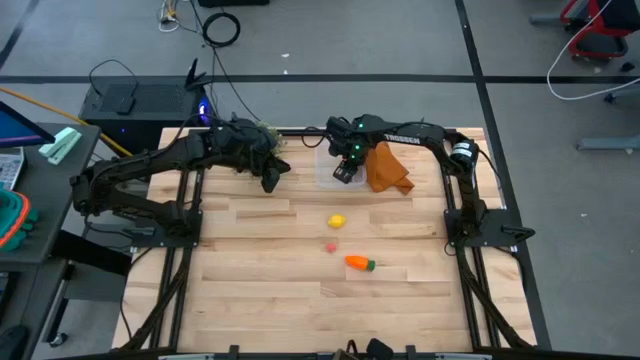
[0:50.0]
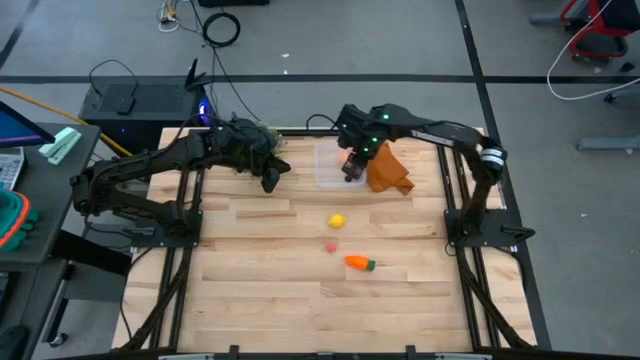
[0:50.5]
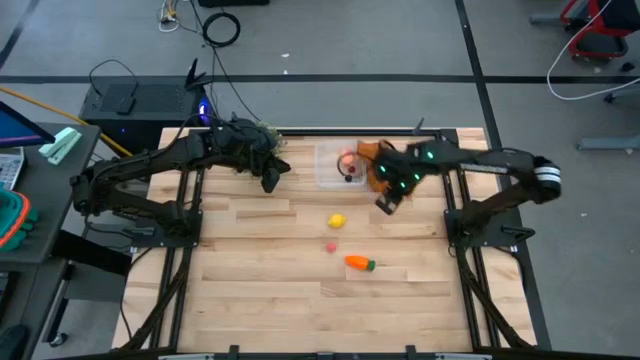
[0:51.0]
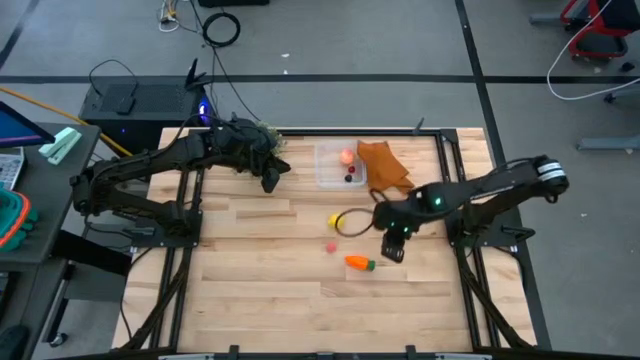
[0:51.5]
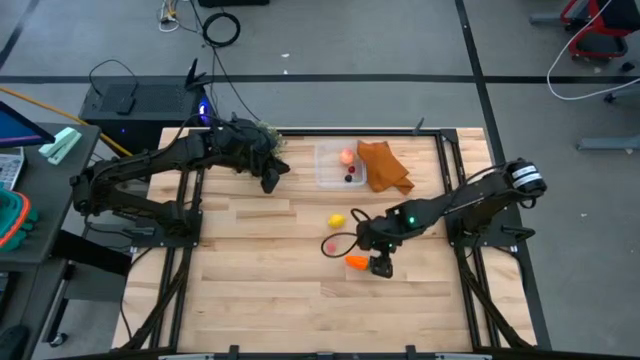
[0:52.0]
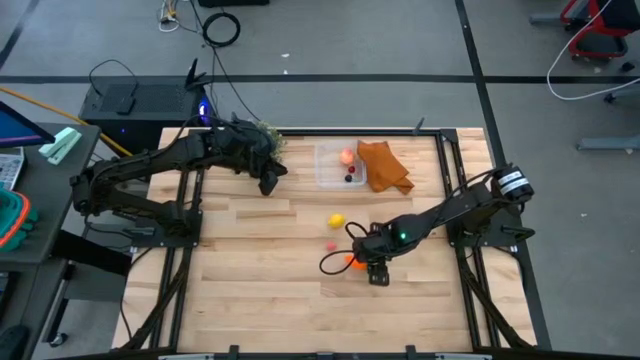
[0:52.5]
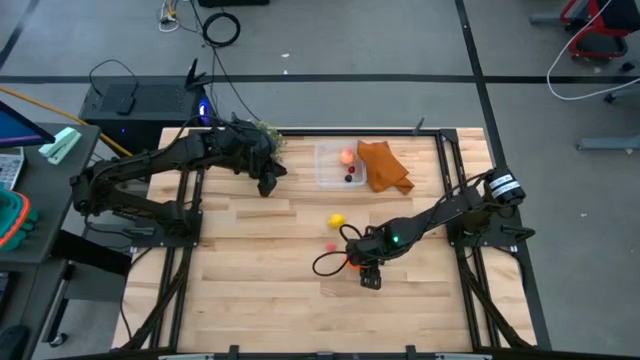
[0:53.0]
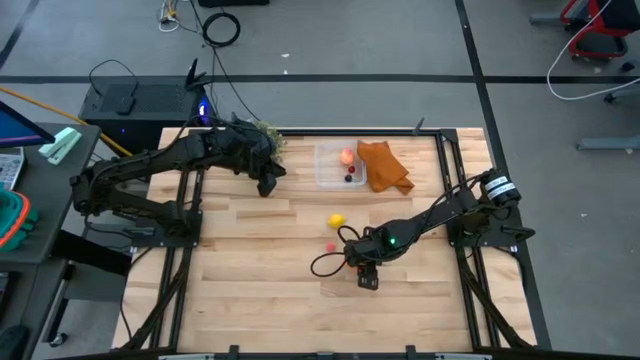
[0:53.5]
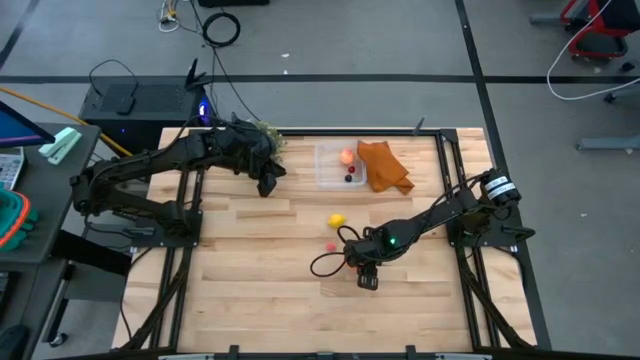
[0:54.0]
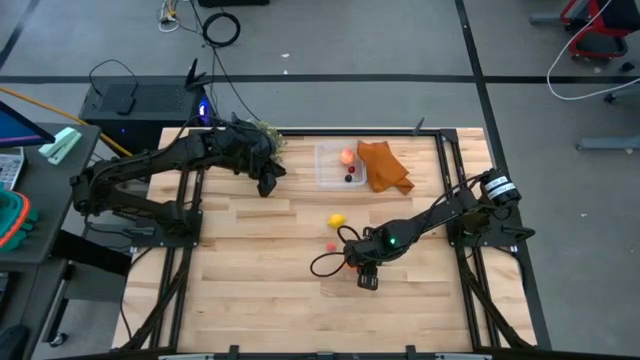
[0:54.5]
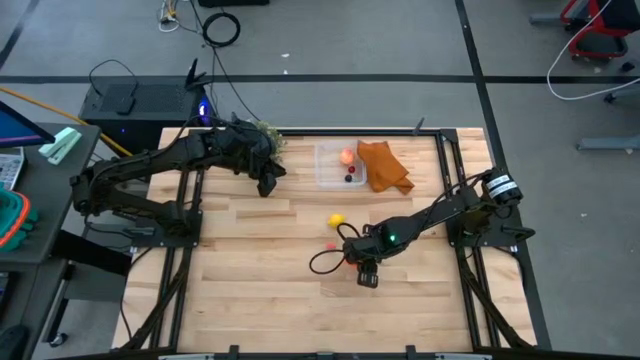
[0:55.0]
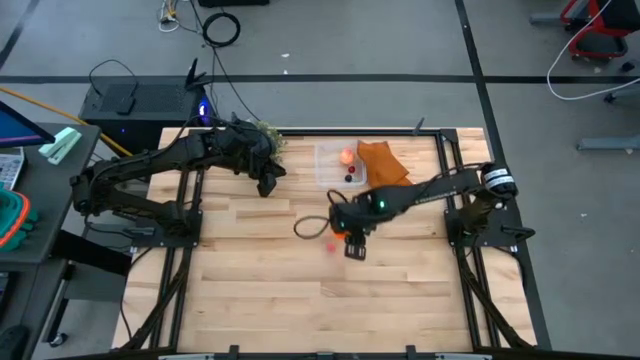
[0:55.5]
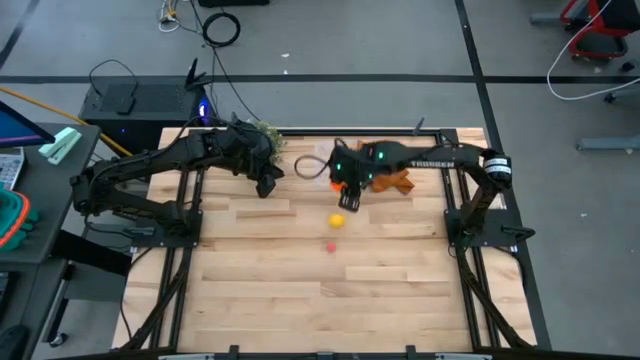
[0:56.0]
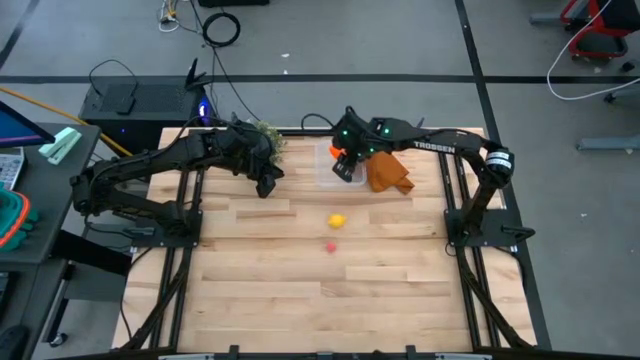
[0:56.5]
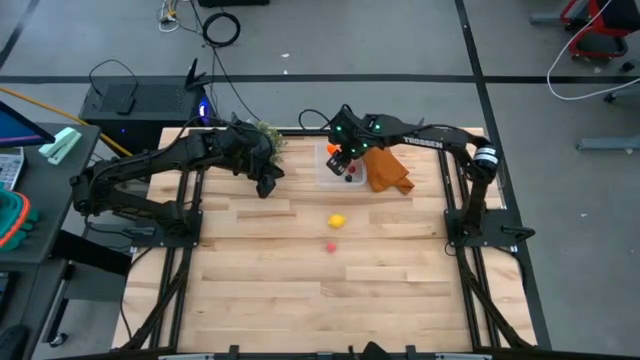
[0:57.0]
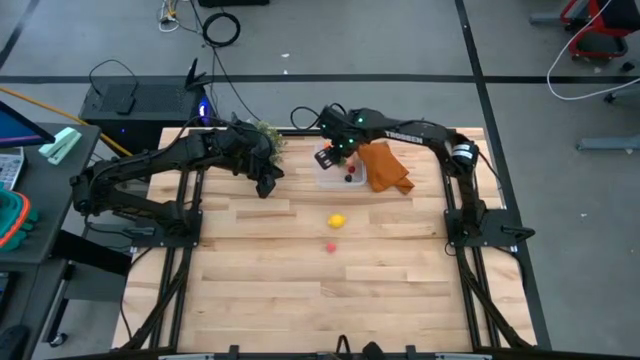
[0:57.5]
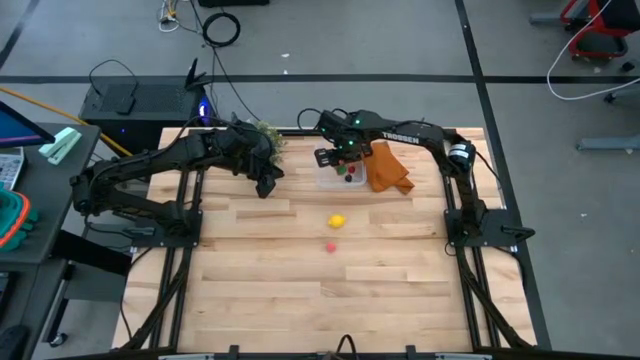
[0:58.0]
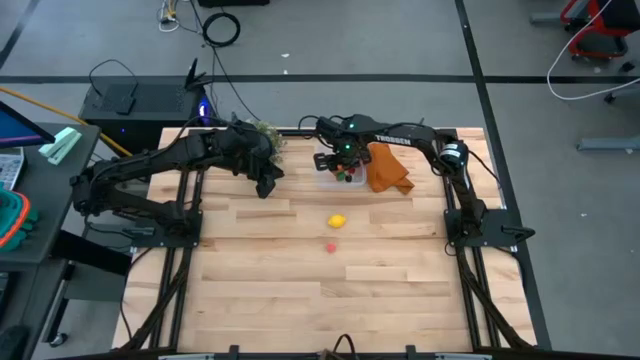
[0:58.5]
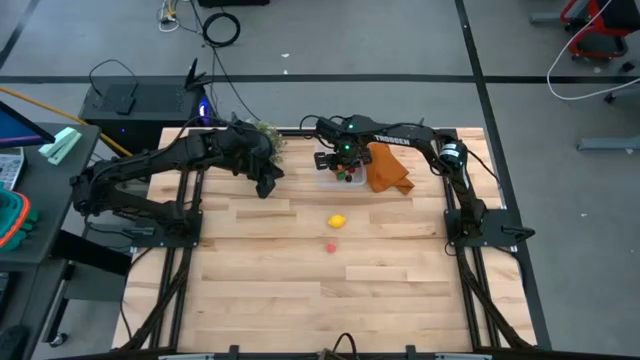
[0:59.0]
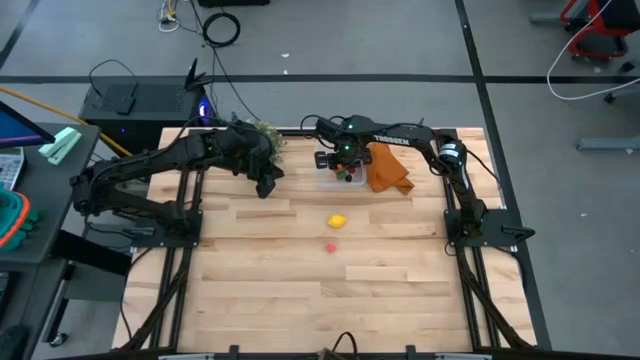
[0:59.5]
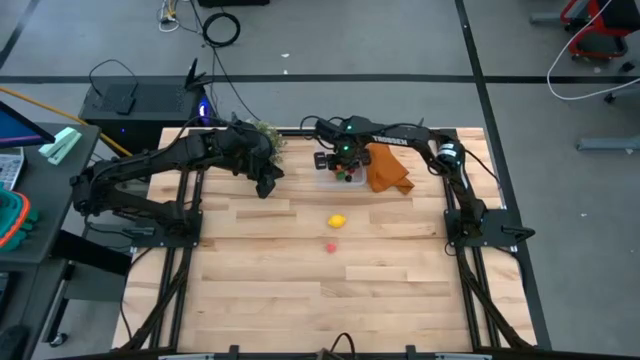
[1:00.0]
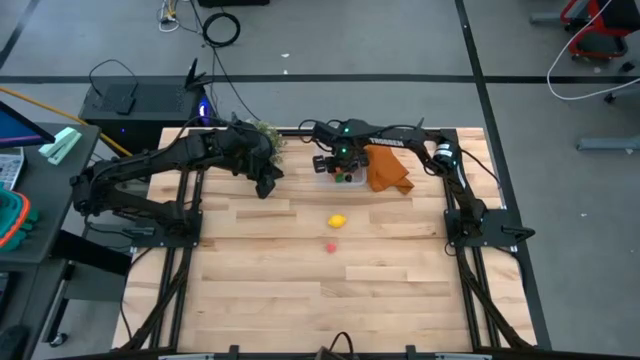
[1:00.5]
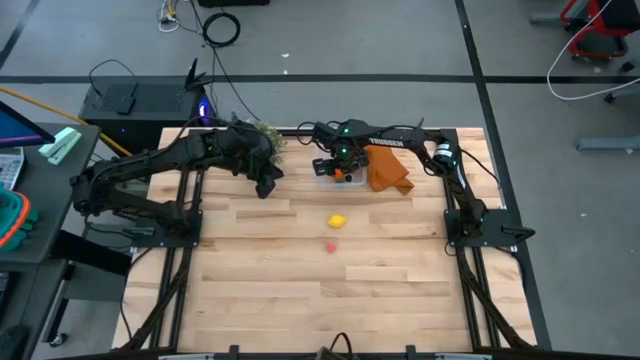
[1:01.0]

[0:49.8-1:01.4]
Task: Pick and placing Produce into tupperware
Put the carrot into the transparent bin

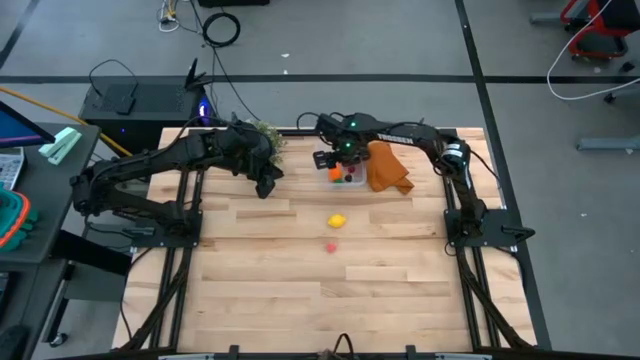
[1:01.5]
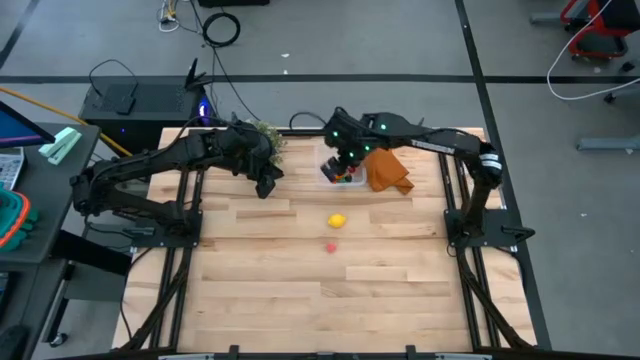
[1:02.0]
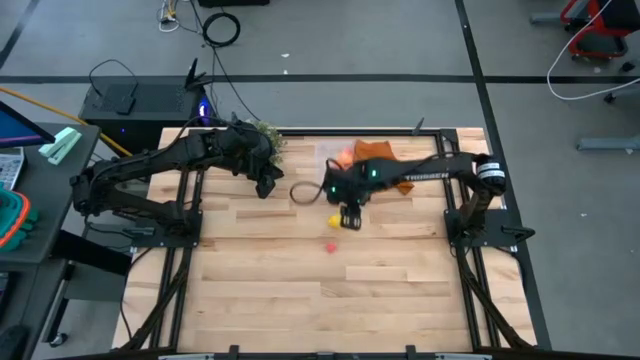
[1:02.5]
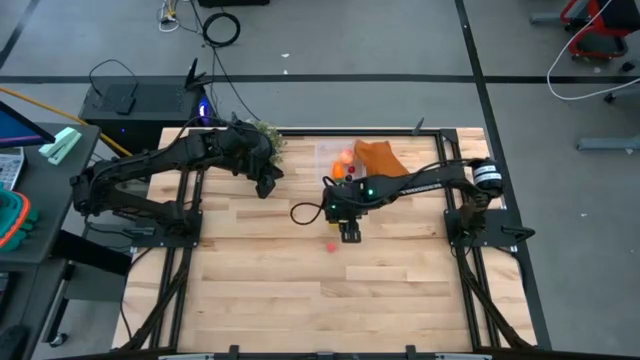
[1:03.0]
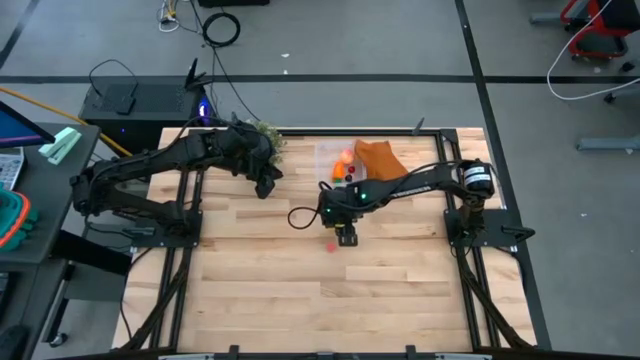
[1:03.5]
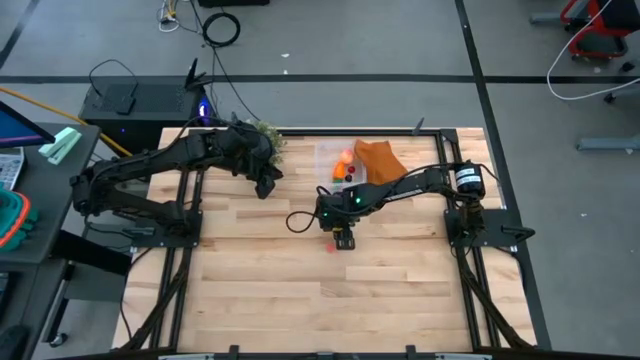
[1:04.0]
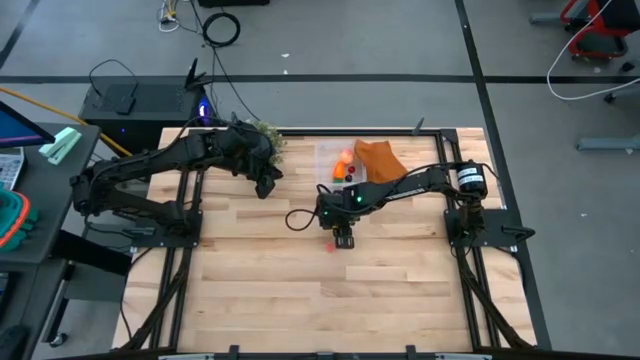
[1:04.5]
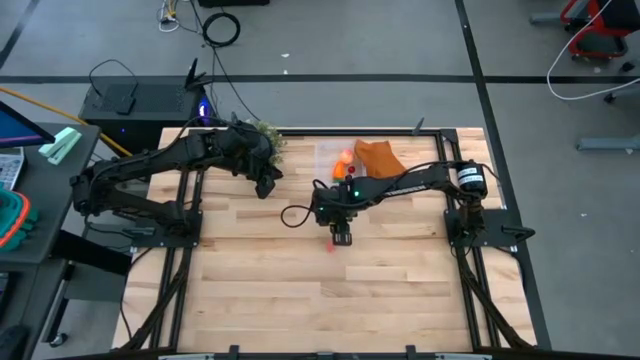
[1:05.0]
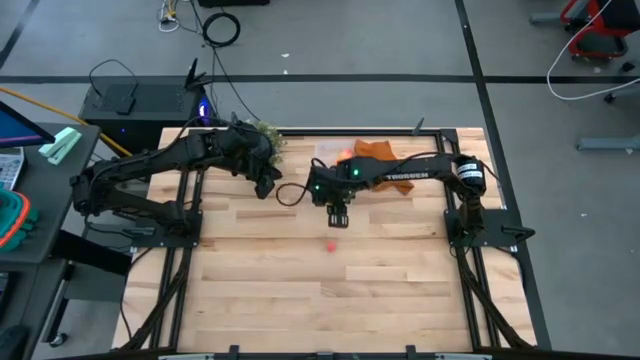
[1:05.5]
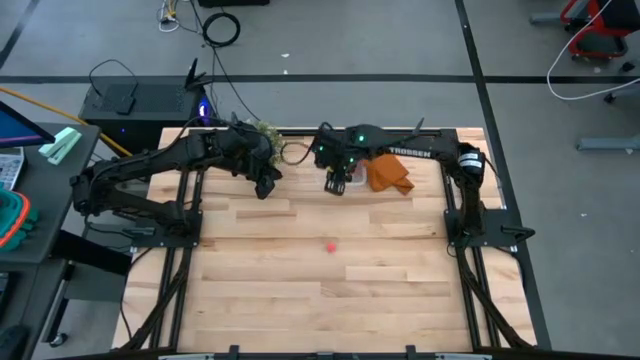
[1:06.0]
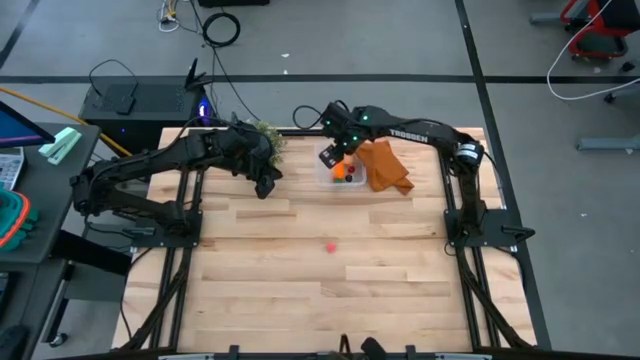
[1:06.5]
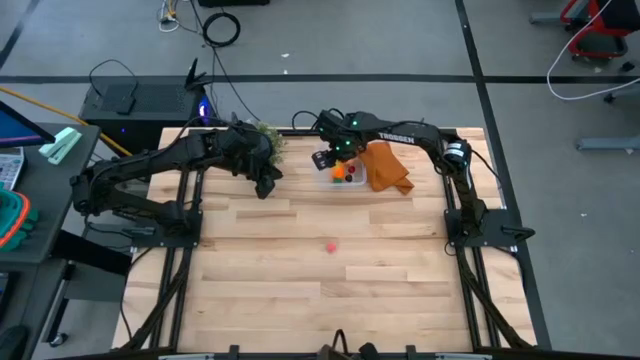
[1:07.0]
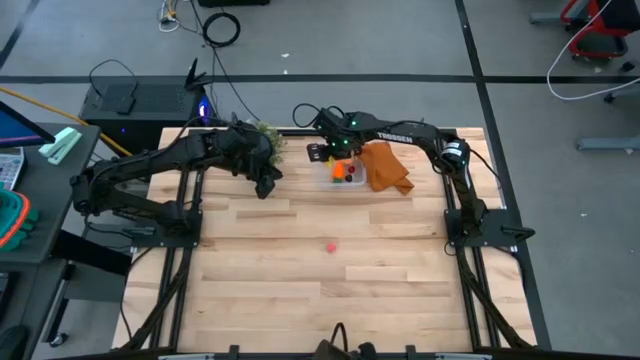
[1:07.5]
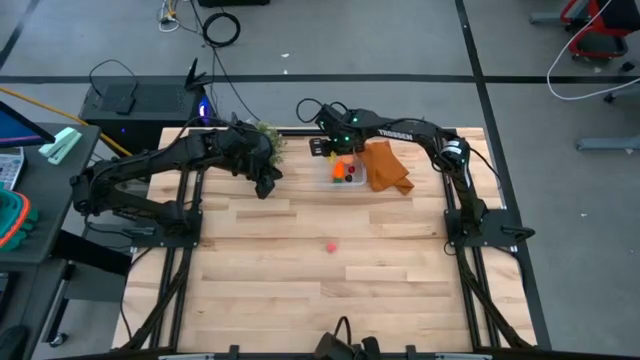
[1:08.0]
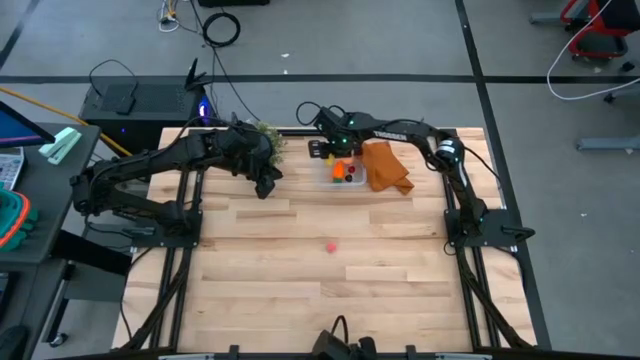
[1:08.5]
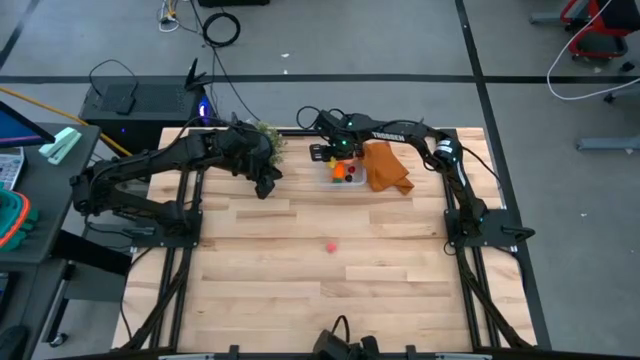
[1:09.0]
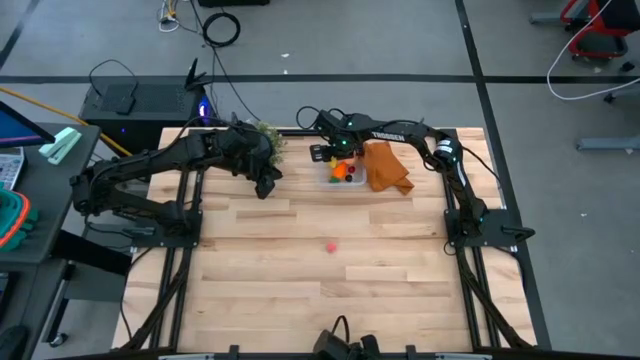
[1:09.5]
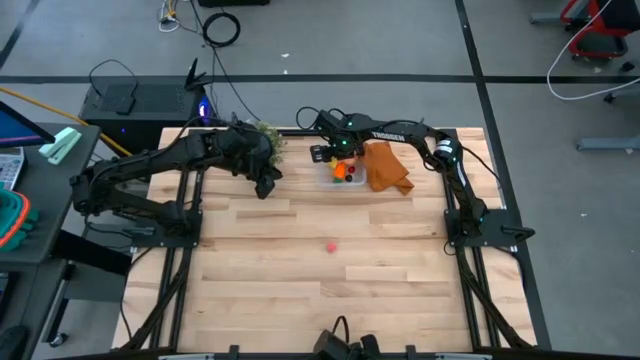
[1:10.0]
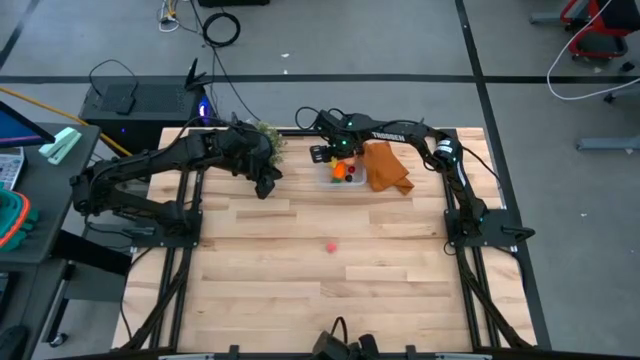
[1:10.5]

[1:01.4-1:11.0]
Put the lemon into the transparent bin

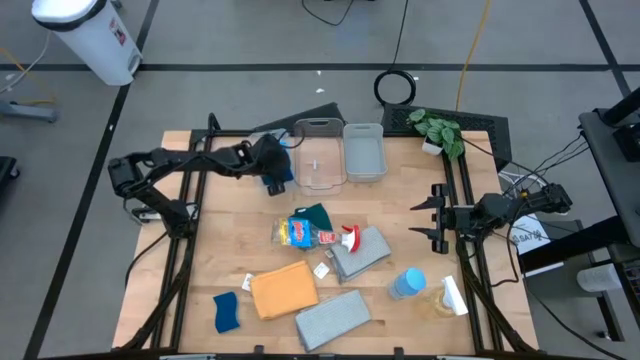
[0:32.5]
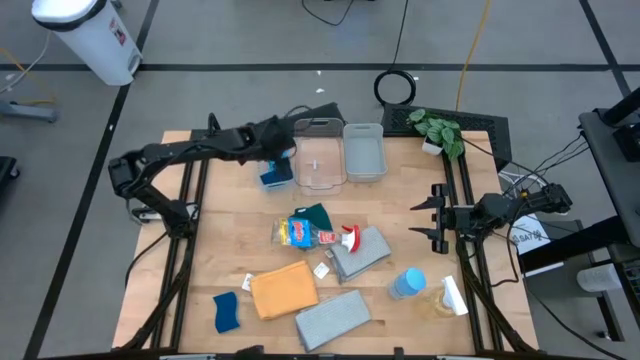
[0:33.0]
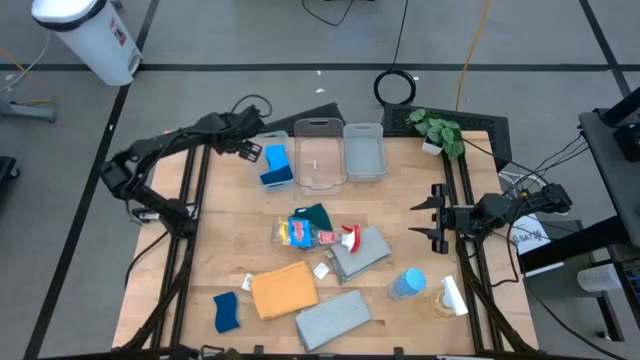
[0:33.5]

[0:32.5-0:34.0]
Task: Pick & Place Kitchen Items
Adjust the white transparent bin
